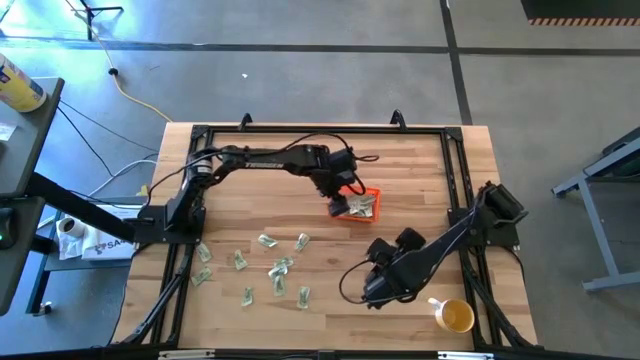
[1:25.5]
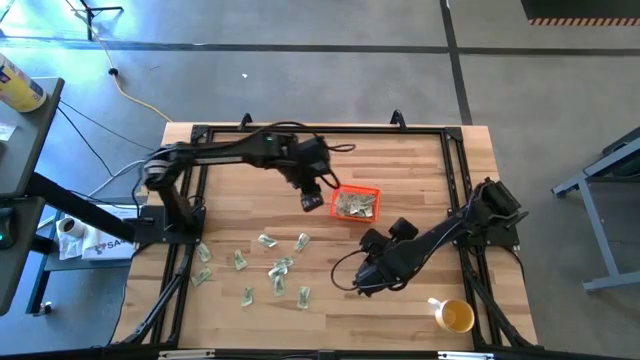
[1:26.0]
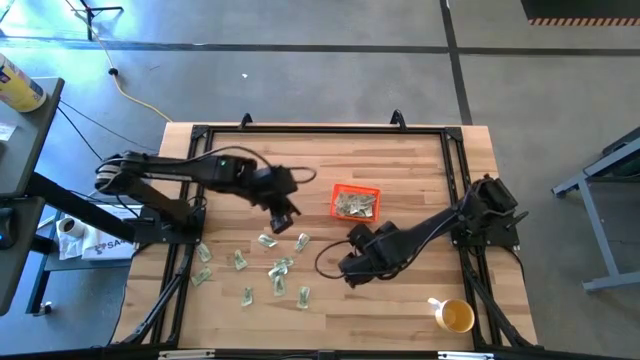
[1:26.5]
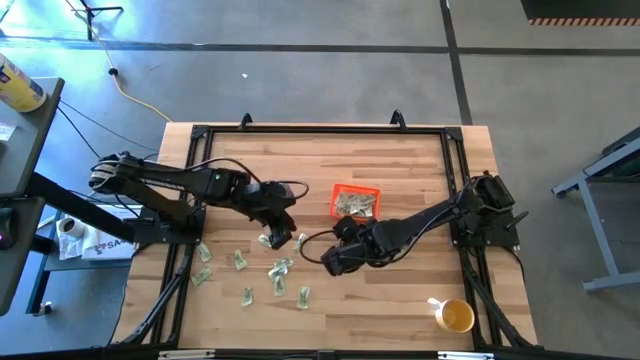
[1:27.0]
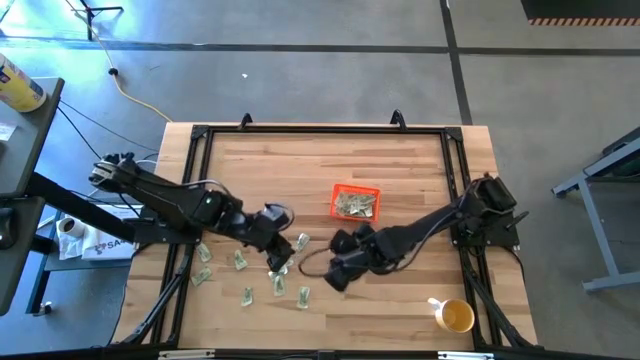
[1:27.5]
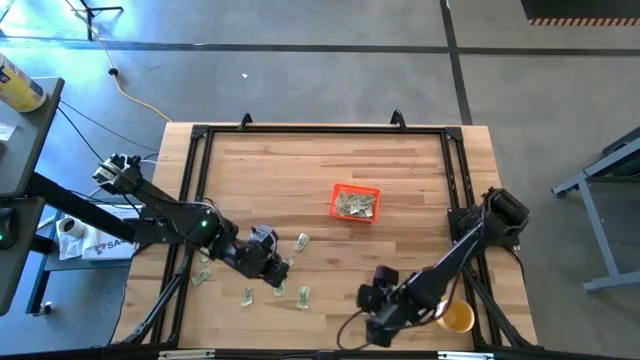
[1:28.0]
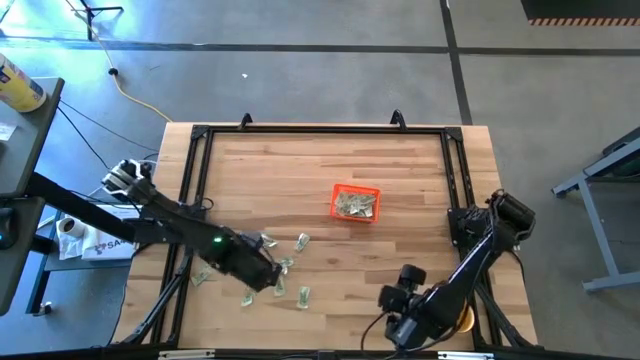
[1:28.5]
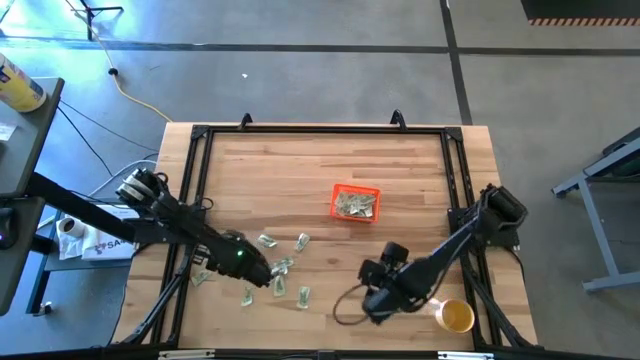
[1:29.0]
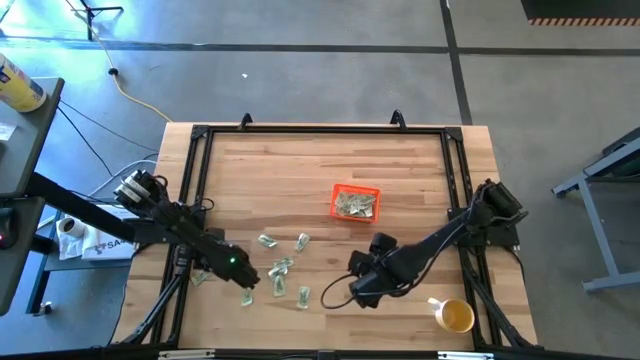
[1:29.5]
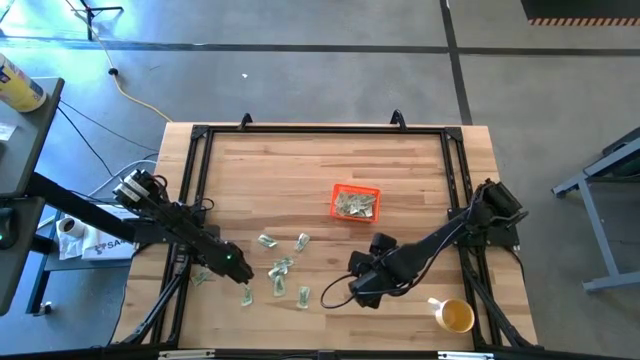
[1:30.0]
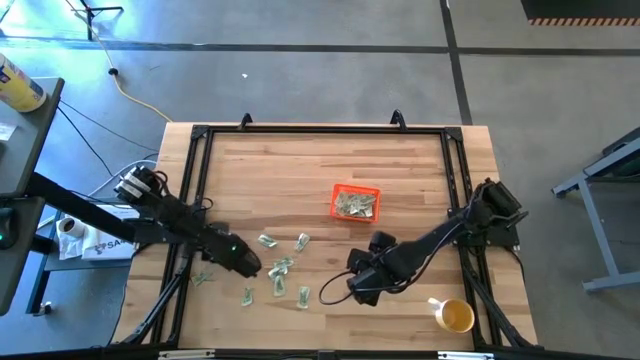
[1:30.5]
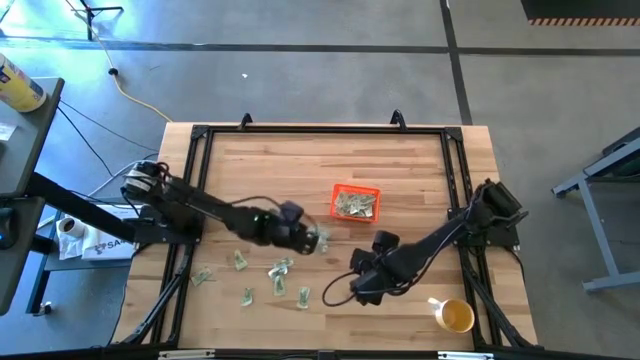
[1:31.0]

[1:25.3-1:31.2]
Task: Pick and place Stevia / Truvia into bins
Adjust the green stevia packets

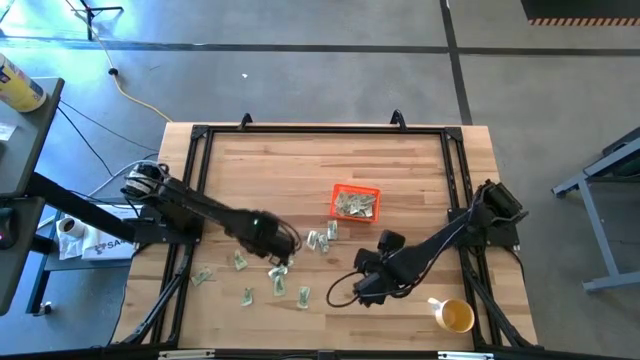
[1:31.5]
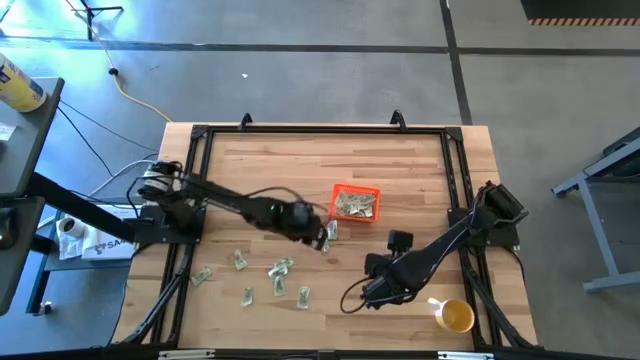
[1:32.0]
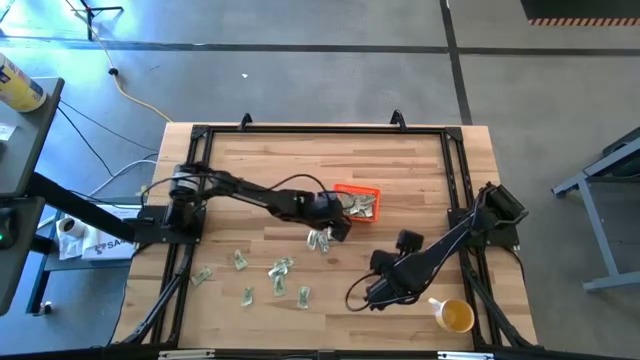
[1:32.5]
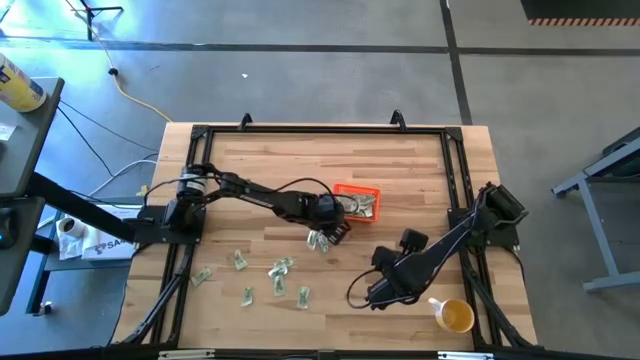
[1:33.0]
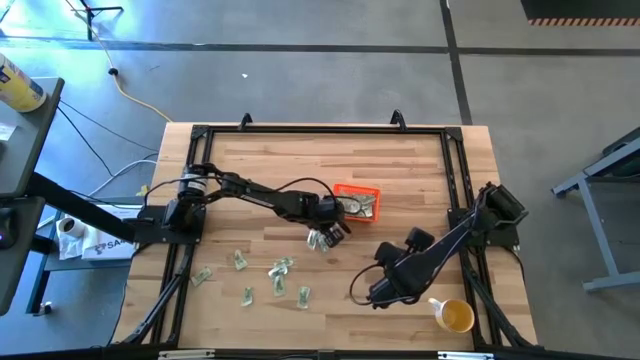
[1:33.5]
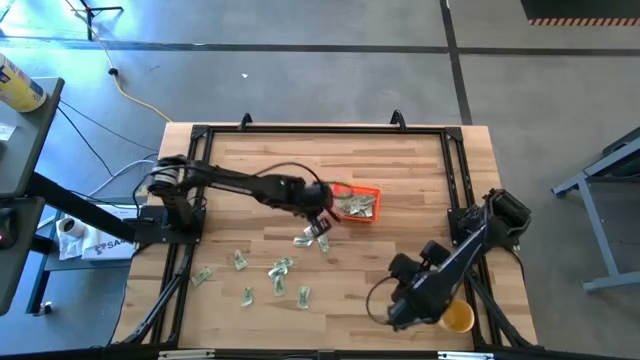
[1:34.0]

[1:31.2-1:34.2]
Put the green stevia packet into the orange basket

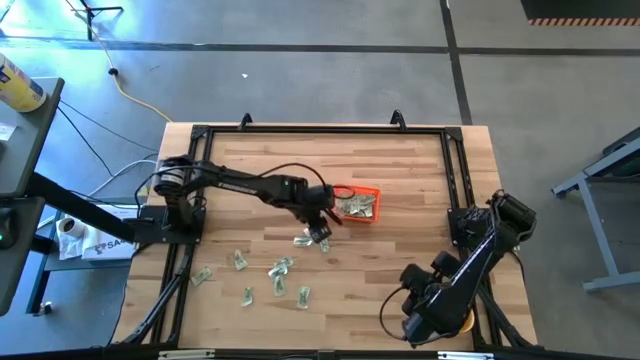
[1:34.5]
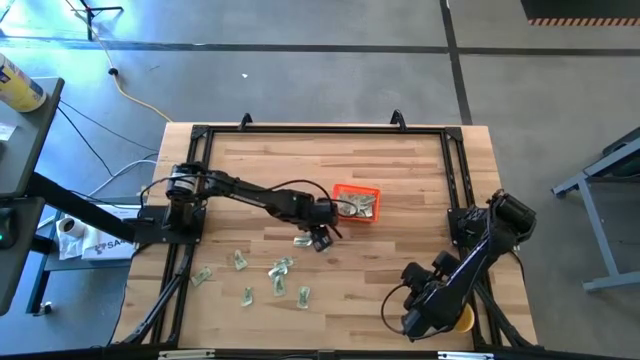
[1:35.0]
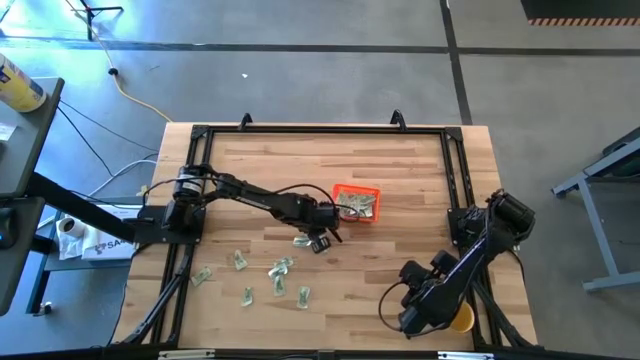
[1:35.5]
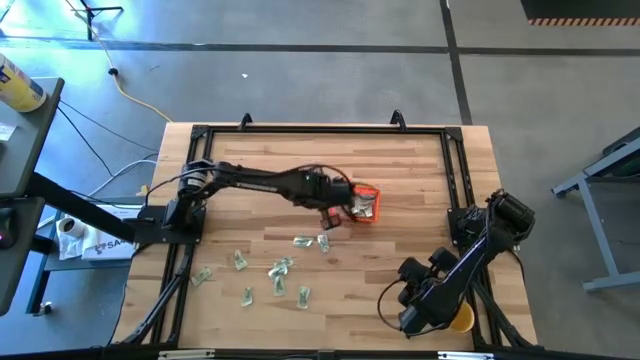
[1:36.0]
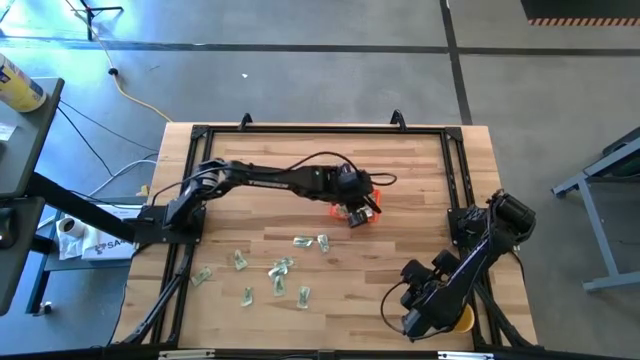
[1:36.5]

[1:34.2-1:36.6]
Put the green stevia packet into the orange basket

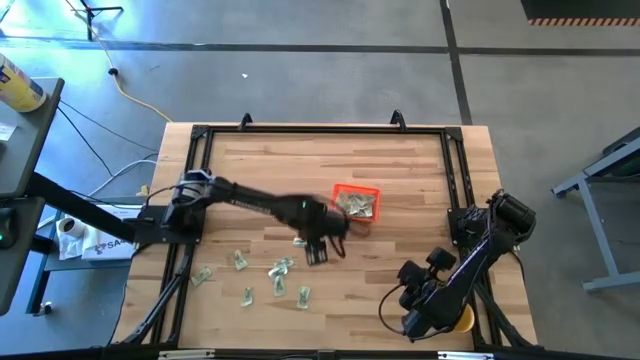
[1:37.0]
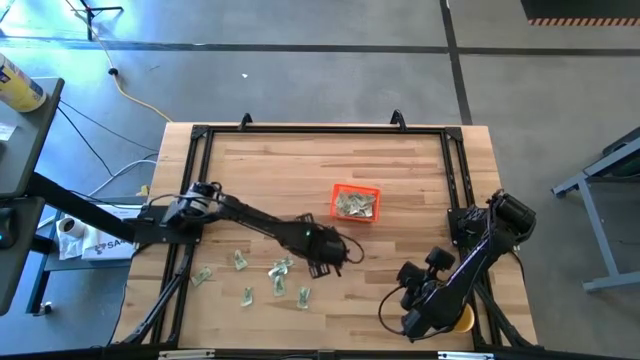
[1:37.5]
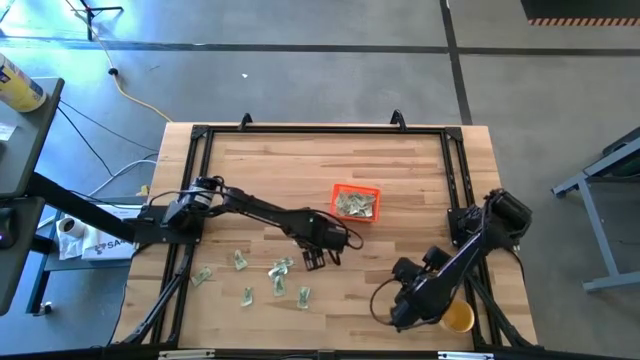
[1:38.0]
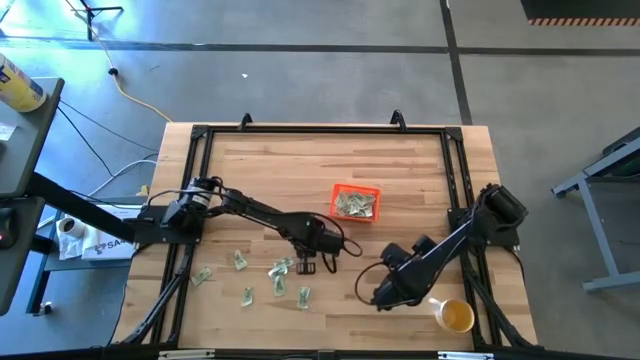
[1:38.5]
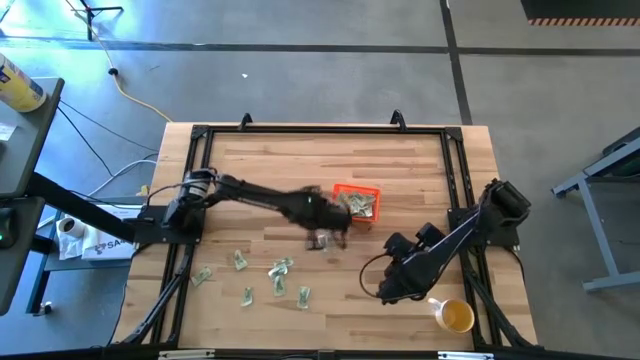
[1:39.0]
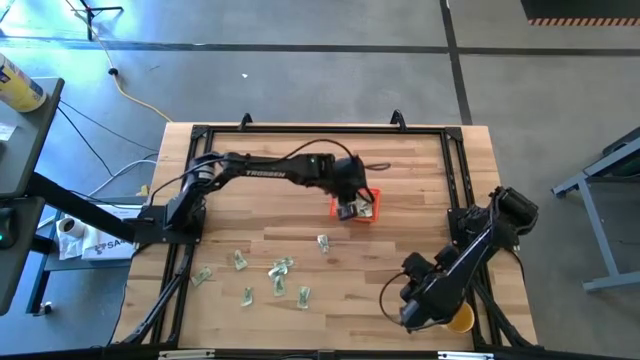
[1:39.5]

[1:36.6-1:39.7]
Put the green stevia packet into the orange basket

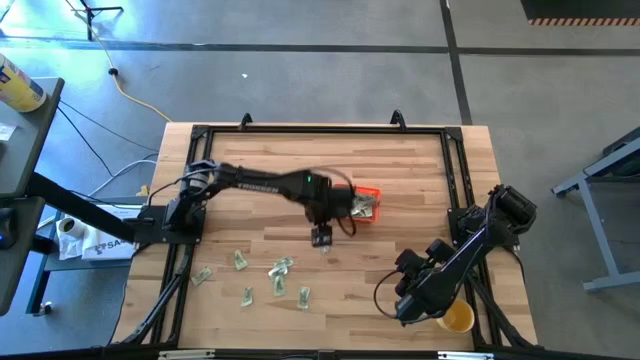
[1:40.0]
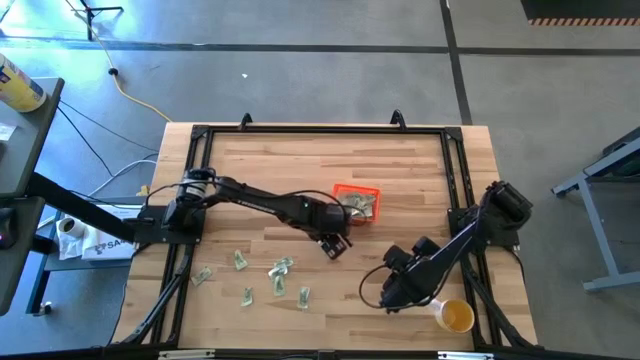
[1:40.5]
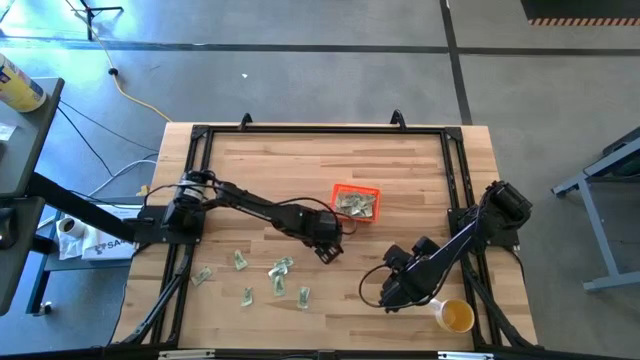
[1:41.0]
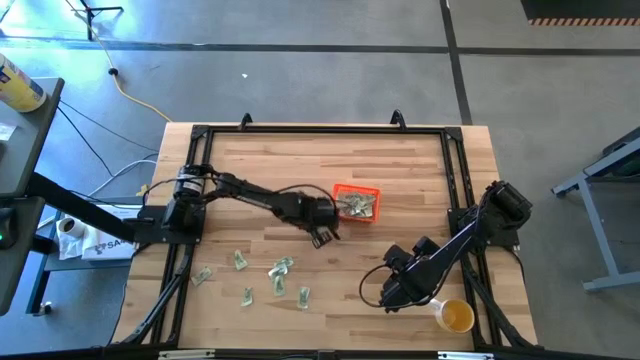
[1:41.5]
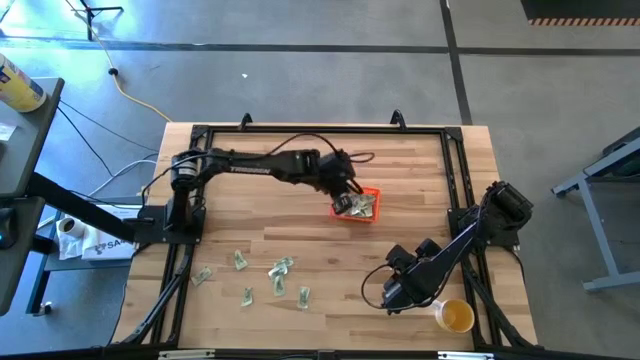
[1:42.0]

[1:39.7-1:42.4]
Put the green stevia packet into the orange basket

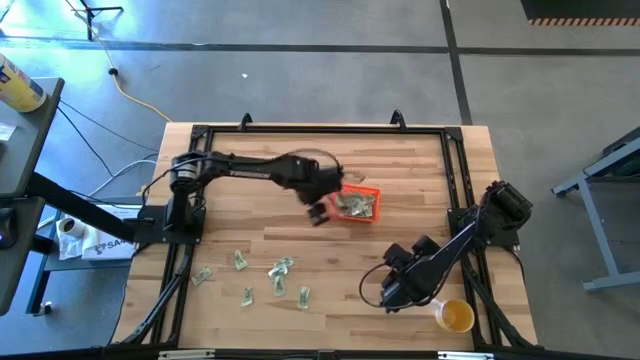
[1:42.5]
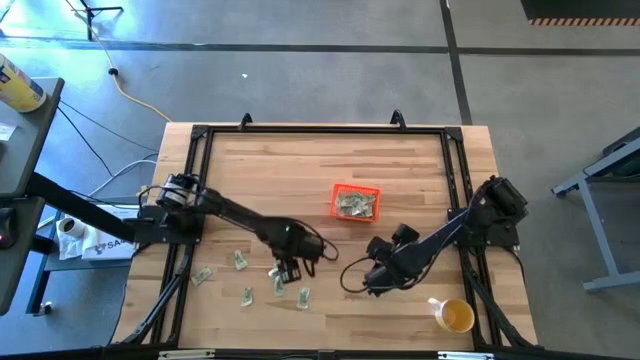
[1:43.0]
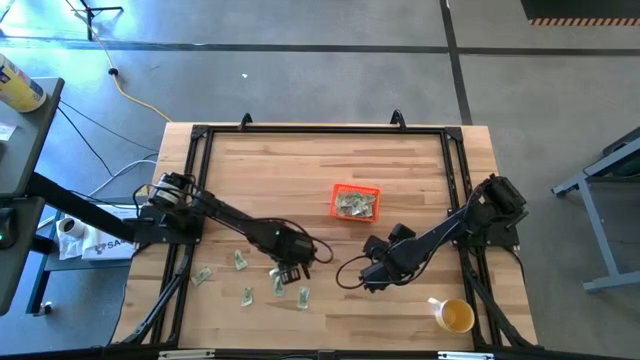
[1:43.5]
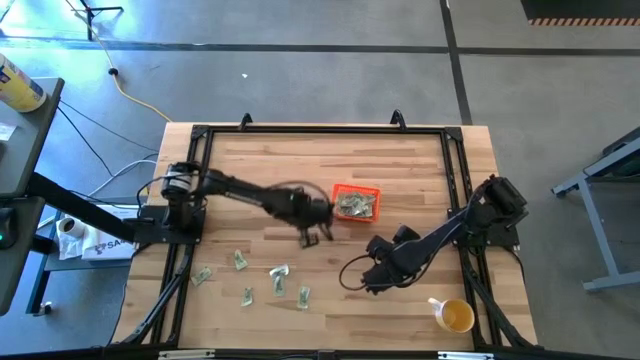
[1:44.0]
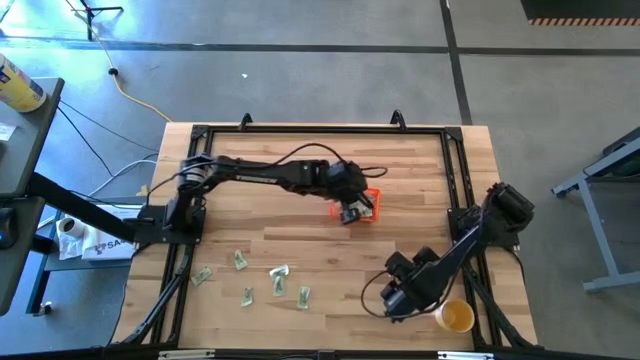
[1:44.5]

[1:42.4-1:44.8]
Put the green stevia packet into the orange basket

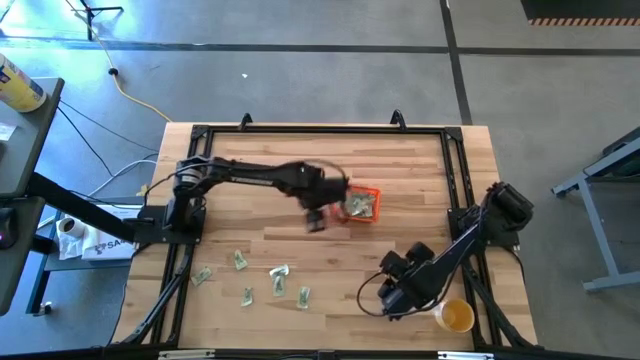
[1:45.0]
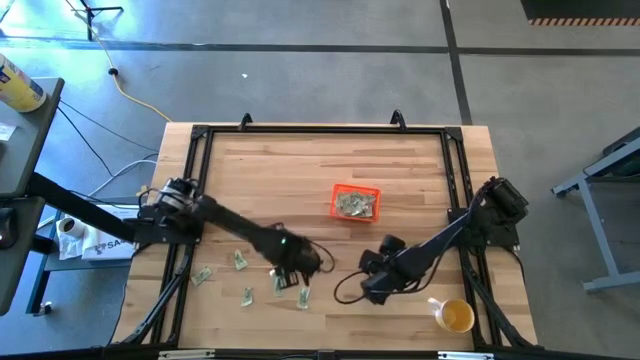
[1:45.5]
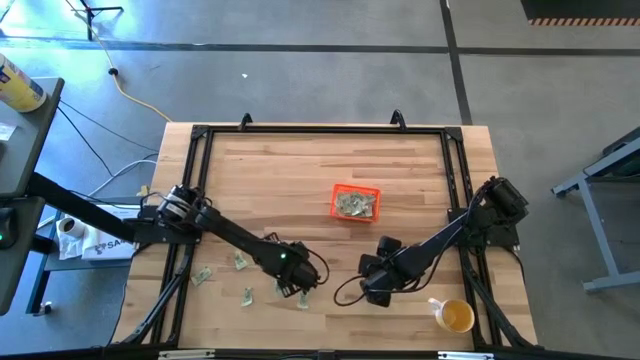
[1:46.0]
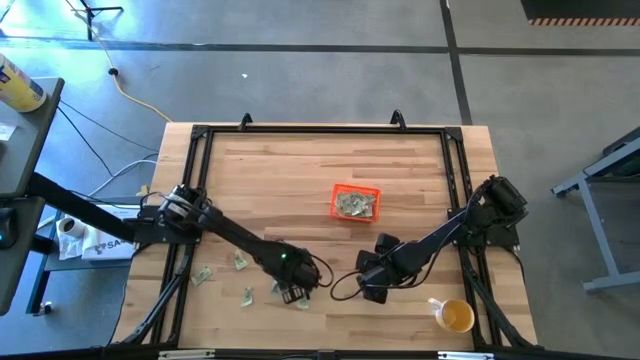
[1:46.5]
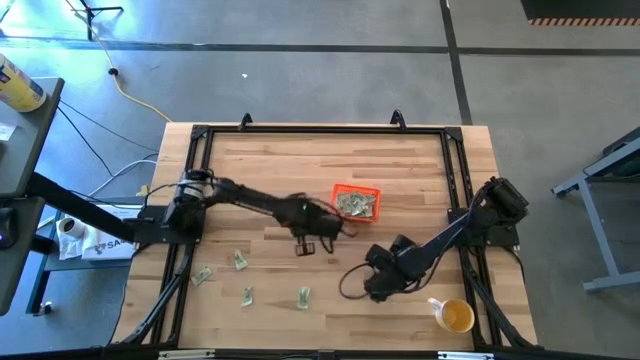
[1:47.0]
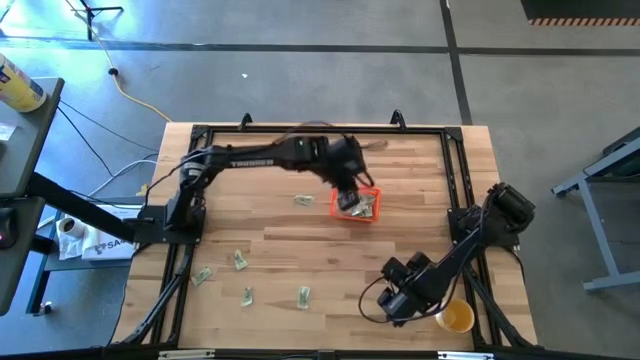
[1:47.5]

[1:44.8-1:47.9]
Put the green stevia packet into the orange basket
